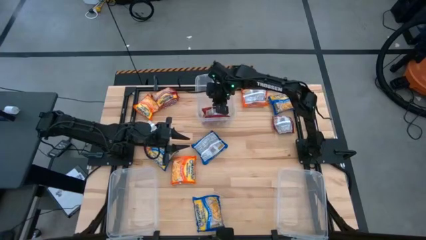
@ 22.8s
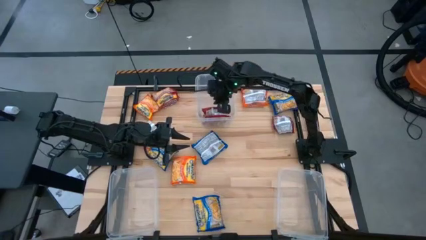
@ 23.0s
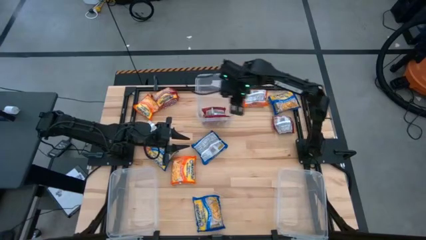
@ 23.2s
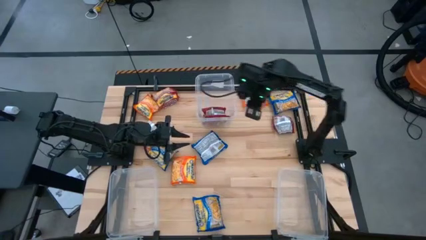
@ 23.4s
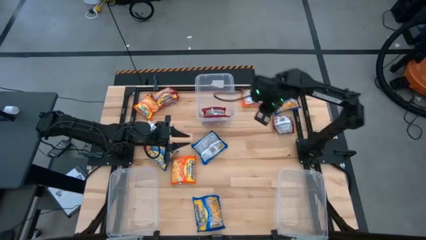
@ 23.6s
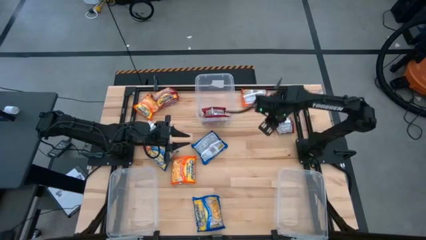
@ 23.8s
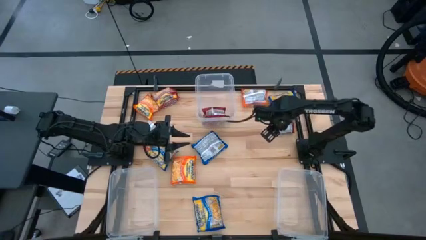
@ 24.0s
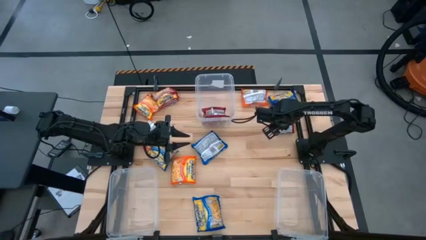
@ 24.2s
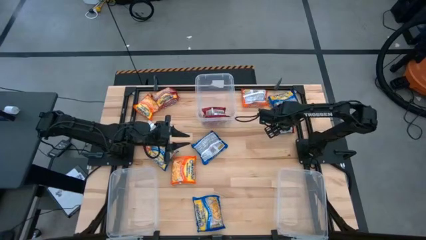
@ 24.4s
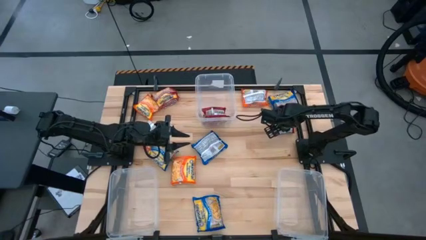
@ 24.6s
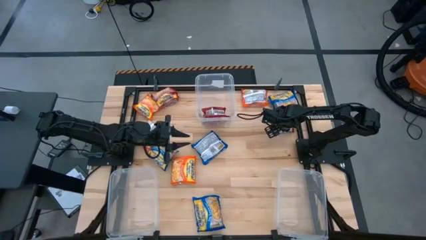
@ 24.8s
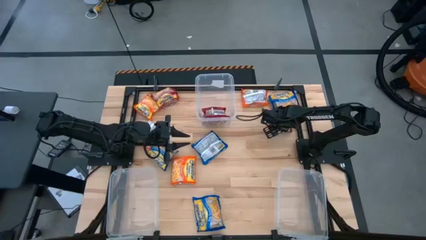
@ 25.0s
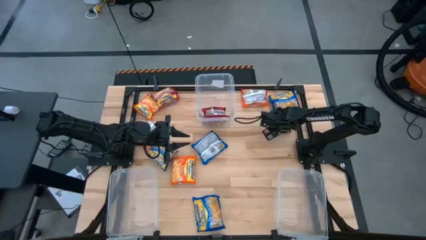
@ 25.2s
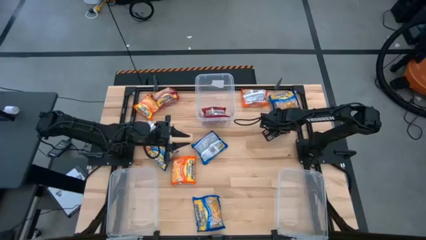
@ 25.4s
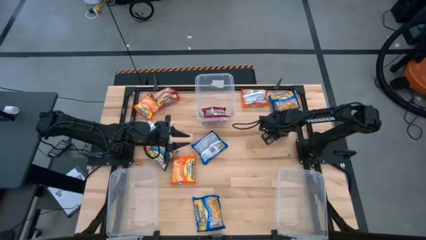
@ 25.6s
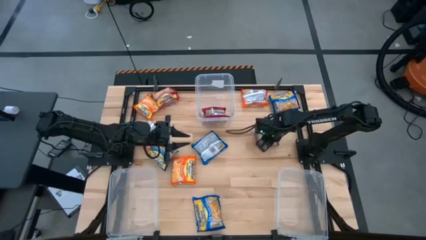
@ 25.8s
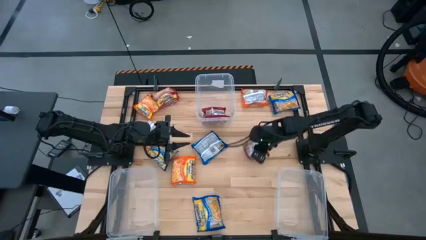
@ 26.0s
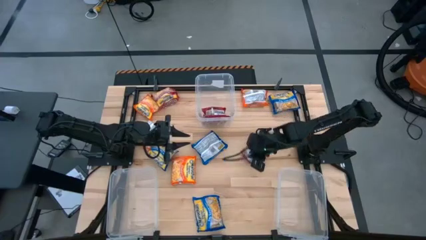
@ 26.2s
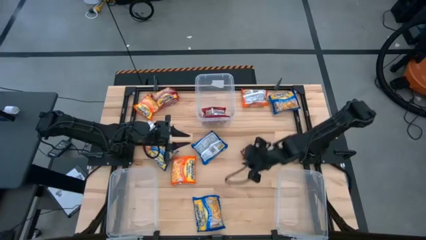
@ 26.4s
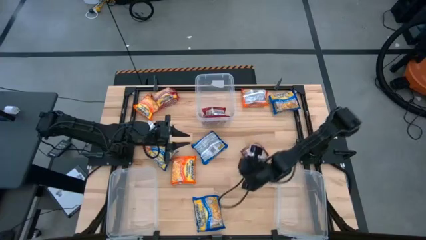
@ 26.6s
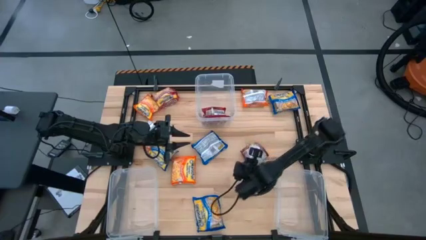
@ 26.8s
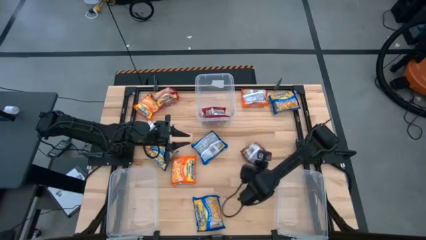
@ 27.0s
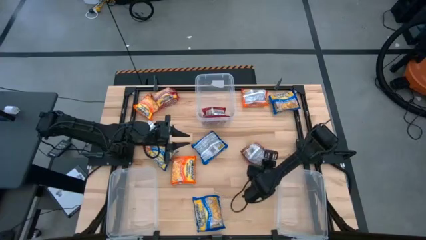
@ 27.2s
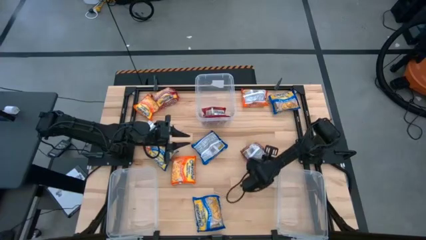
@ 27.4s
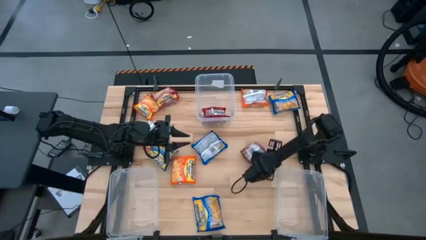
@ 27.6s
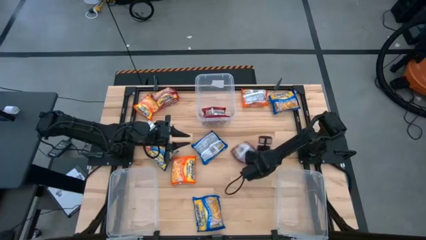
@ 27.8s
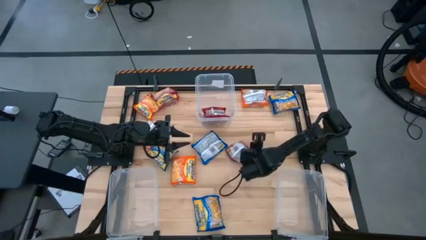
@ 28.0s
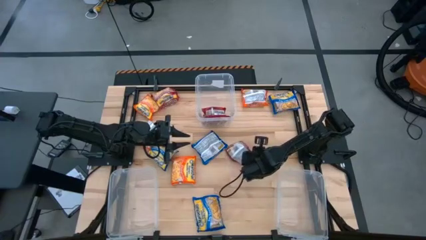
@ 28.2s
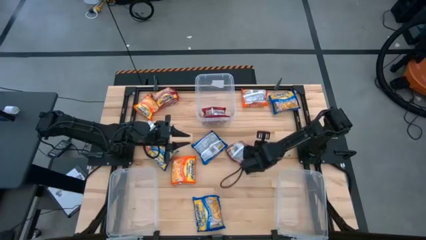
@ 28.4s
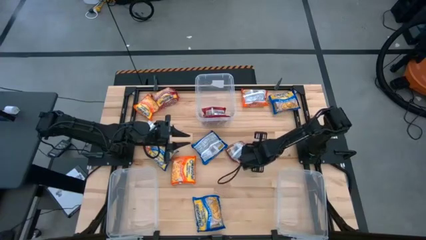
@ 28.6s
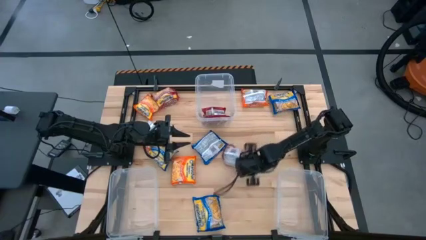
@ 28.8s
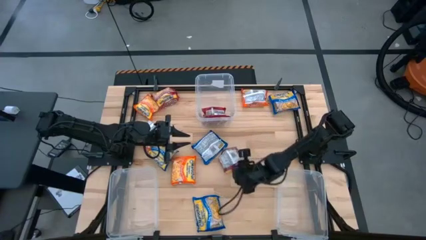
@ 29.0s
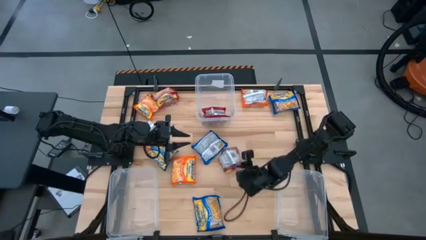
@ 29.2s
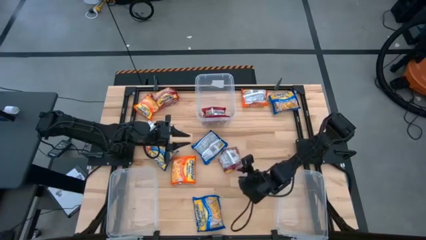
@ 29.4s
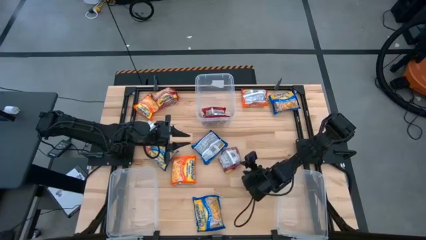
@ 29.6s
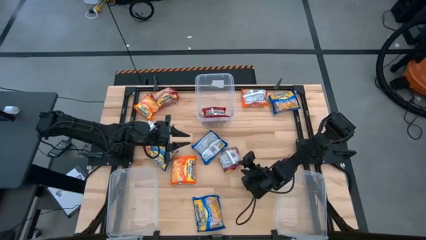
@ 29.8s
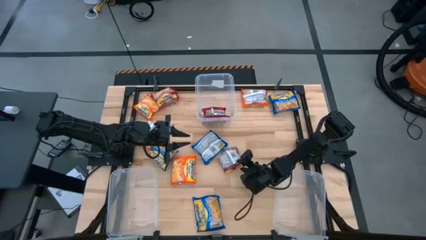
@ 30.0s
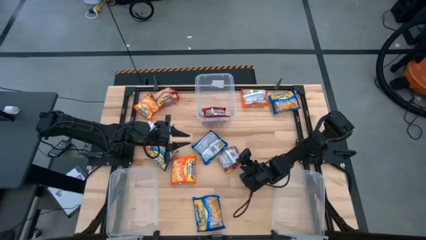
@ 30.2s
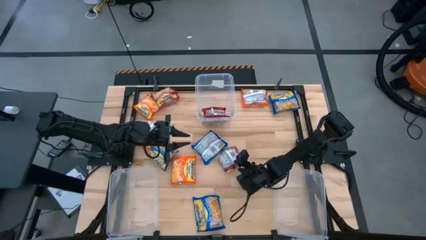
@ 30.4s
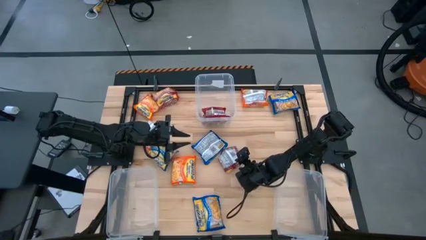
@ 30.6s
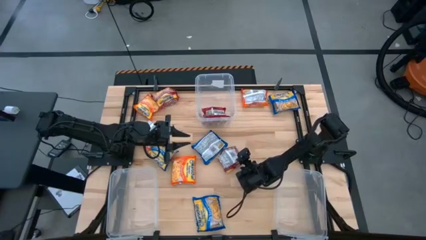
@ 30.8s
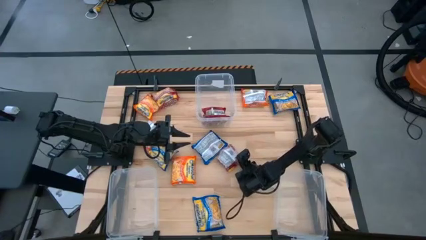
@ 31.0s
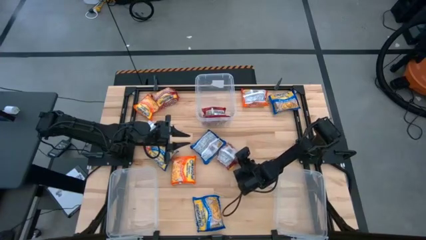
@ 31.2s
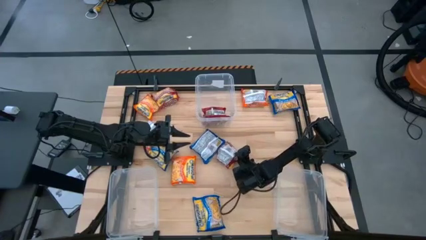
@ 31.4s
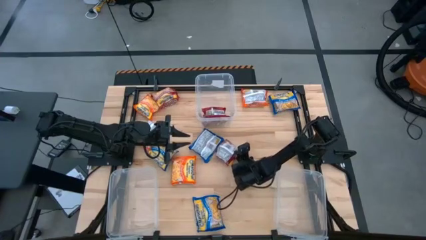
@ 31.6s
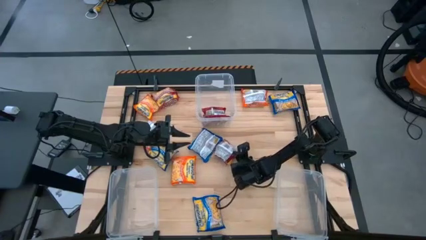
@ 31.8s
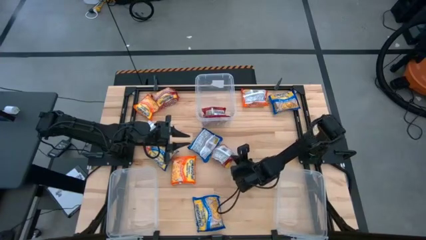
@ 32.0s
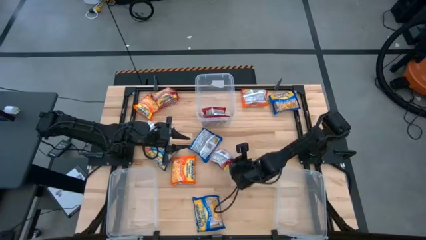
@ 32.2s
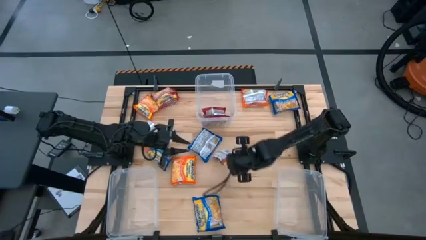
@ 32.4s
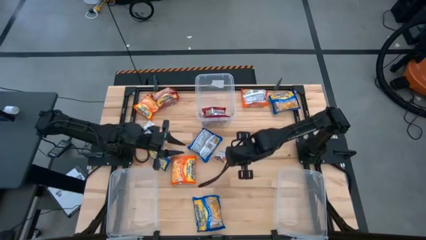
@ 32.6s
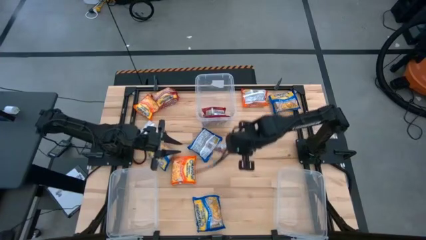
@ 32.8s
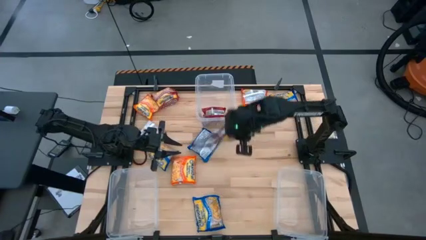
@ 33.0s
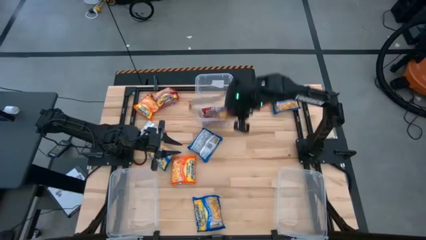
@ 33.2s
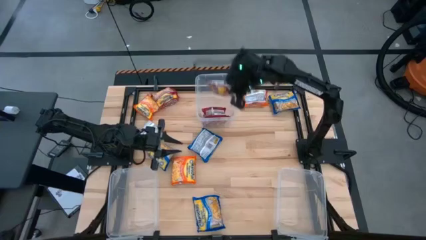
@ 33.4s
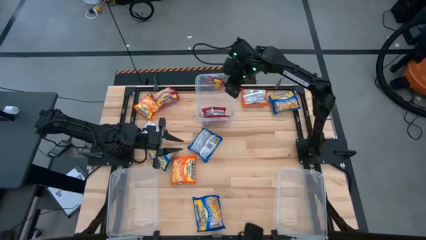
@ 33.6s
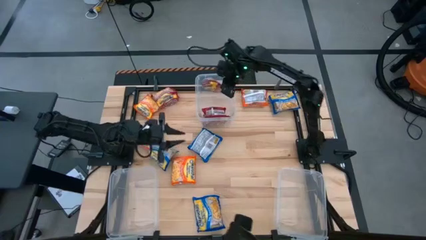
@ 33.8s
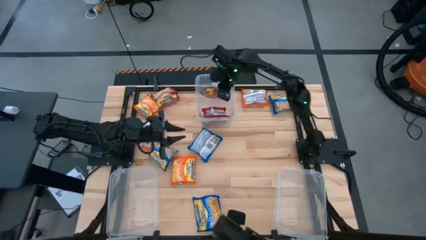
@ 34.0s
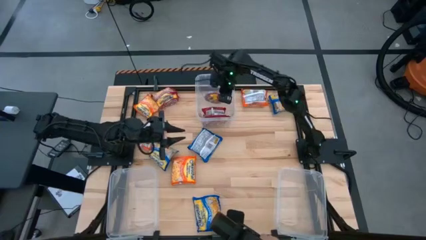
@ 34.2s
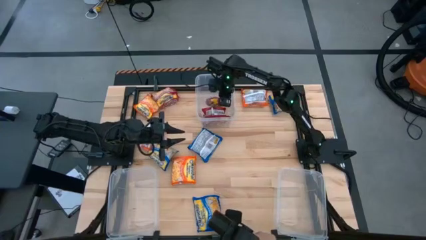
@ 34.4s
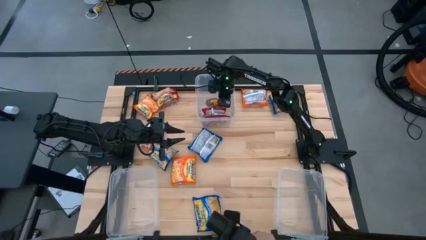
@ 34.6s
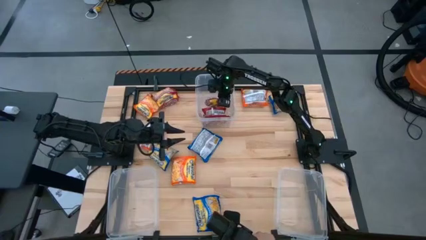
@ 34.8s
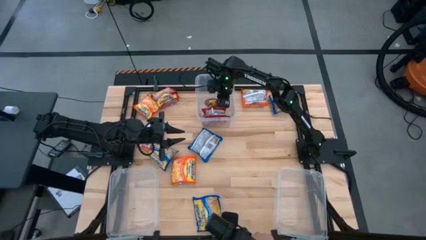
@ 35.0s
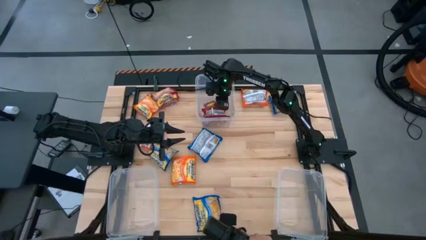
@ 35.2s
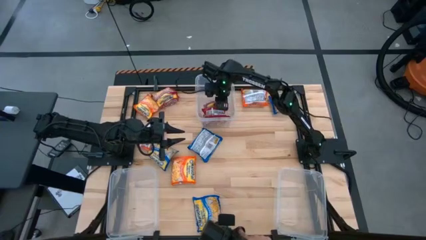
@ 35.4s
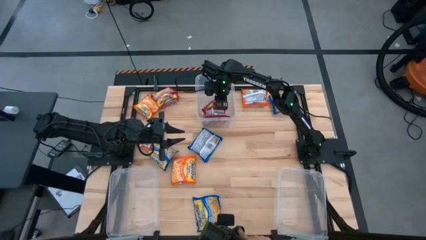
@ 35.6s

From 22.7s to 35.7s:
Task: Sort Maruchan noodles
Put the red noodle pack into the top transparent bin
